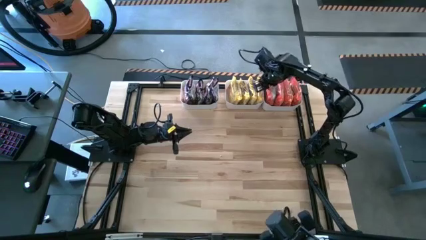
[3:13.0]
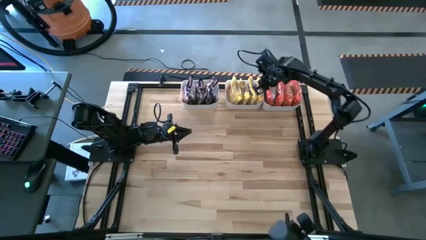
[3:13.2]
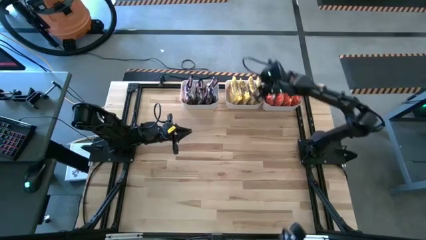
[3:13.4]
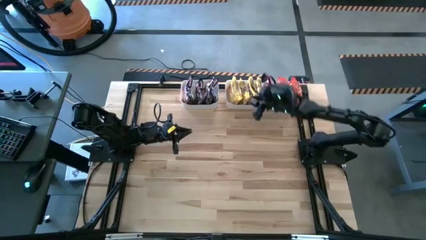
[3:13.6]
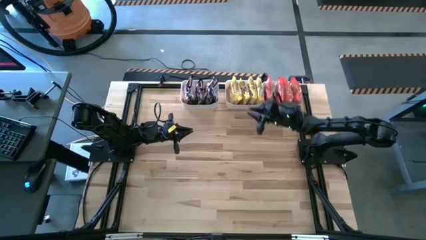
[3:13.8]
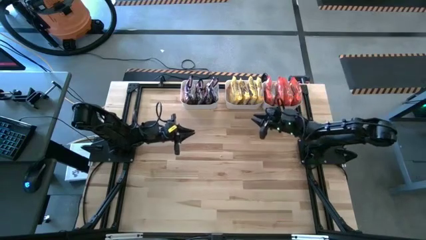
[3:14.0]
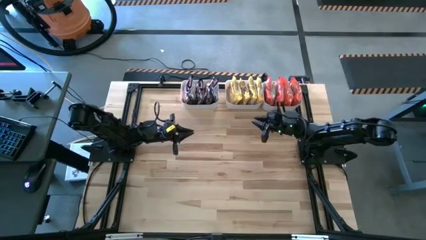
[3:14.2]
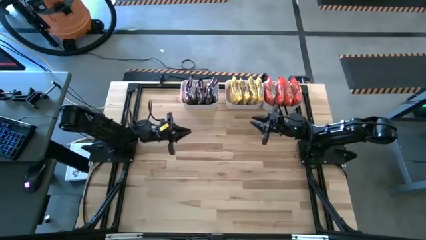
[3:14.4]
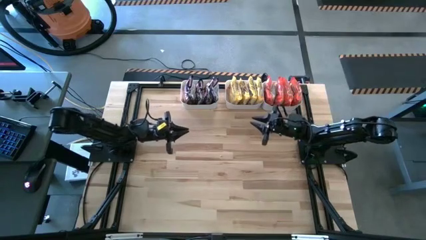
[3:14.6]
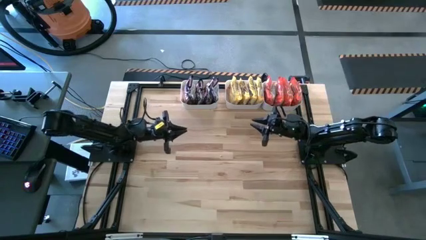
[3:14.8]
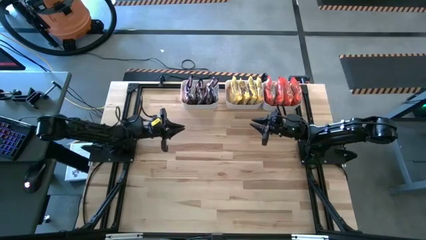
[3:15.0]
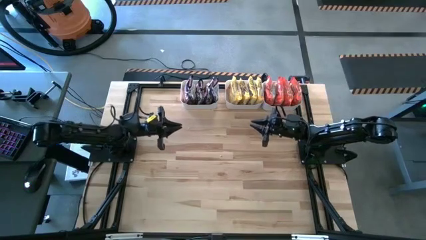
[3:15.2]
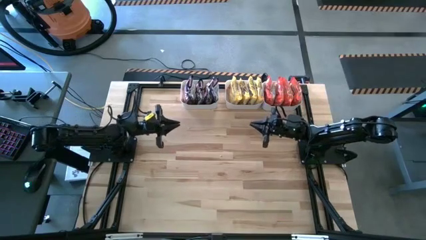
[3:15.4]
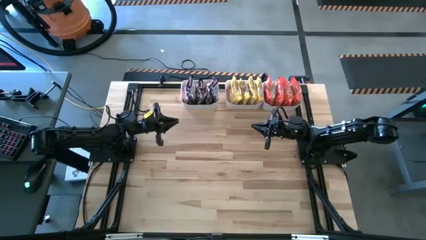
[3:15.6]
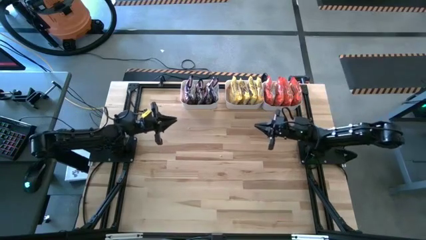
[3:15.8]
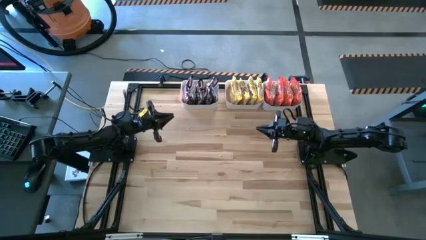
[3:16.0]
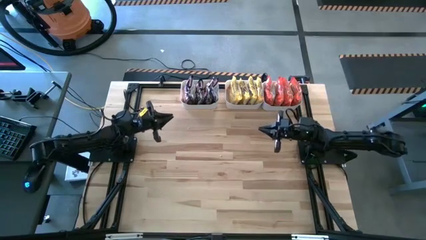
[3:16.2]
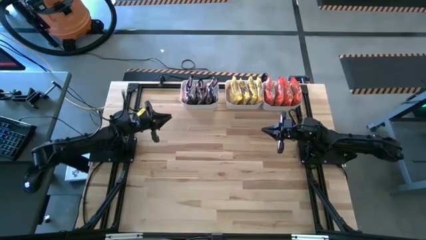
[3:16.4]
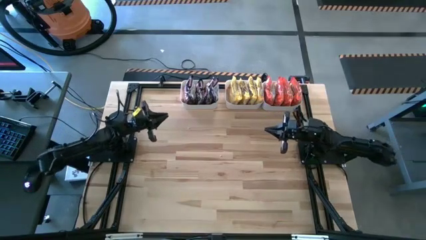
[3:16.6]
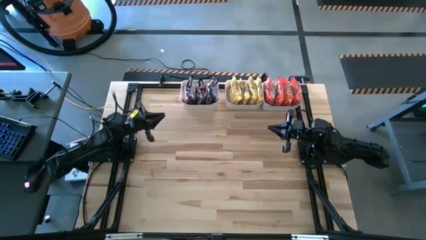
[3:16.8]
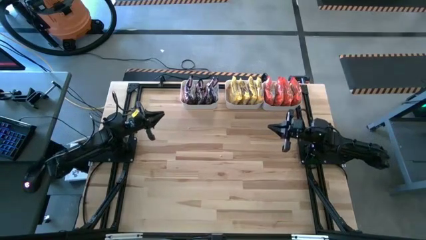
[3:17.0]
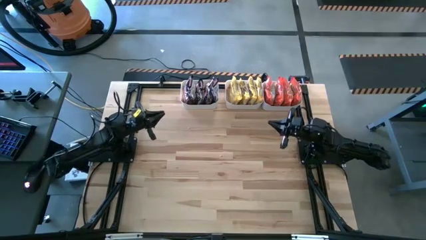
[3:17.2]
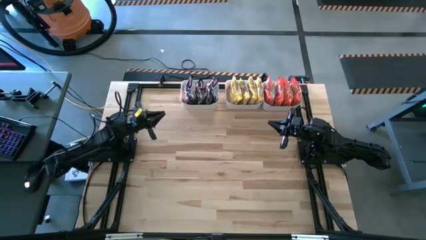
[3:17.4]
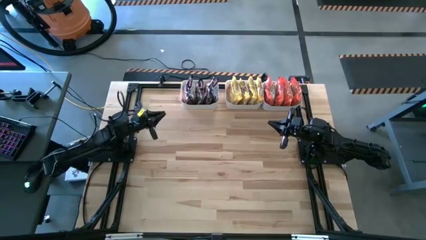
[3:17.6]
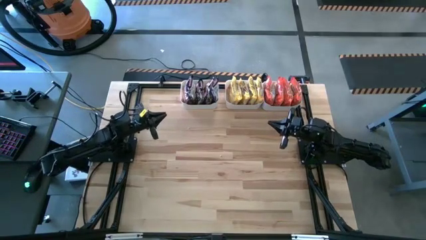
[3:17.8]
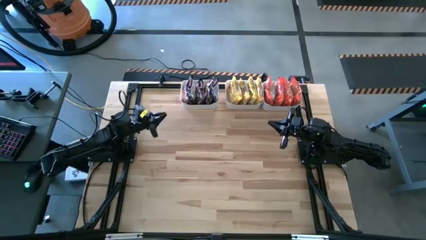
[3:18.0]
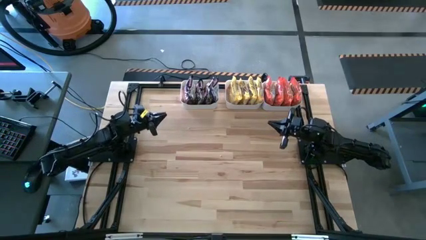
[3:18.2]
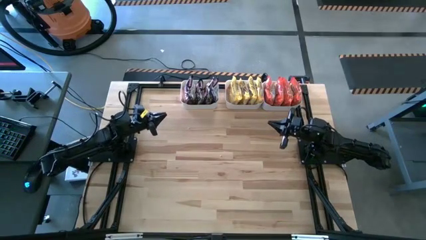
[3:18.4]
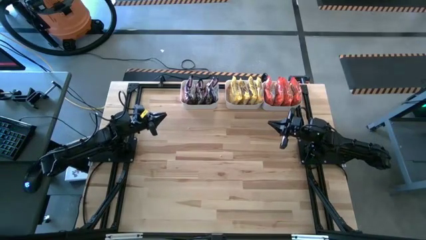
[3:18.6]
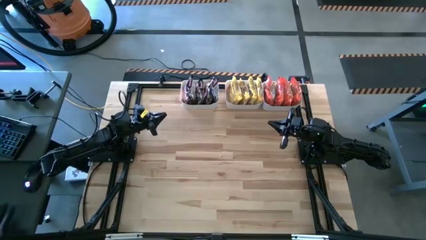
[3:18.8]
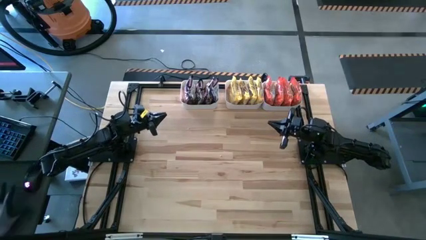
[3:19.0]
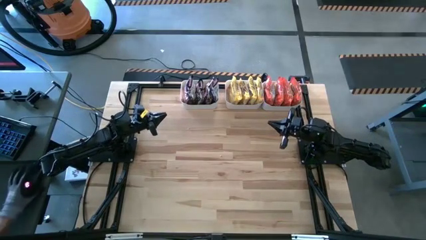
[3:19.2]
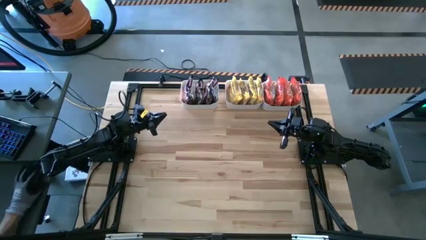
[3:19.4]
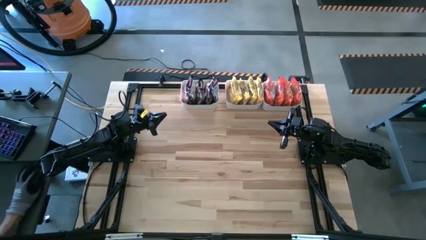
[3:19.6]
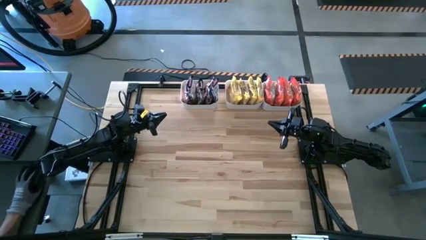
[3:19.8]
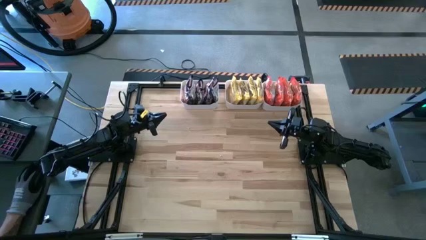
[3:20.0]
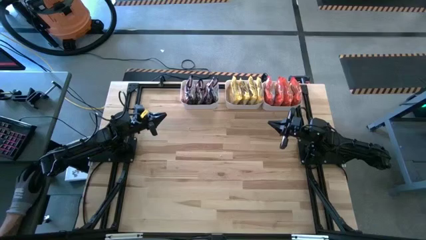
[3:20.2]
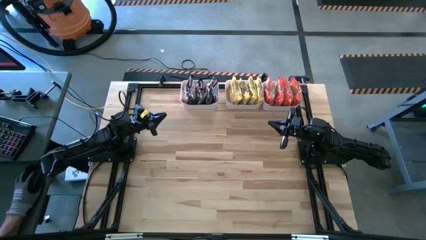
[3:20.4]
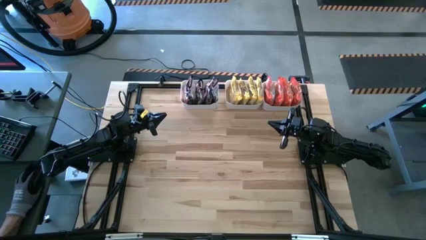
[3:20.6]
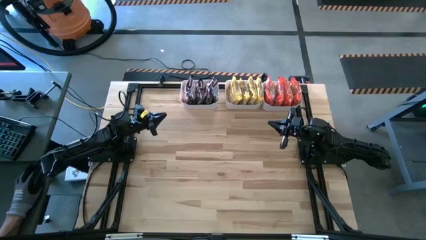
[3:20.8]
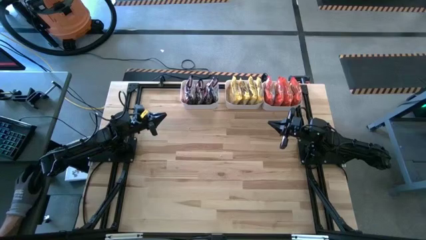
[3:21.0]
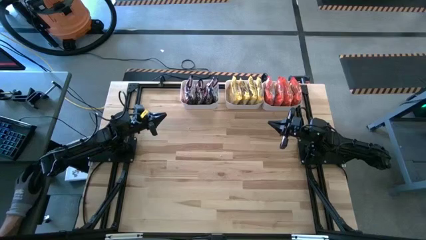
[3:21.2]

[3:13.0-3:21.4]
Task: Sort Maruchan noodles
Return to Home Position

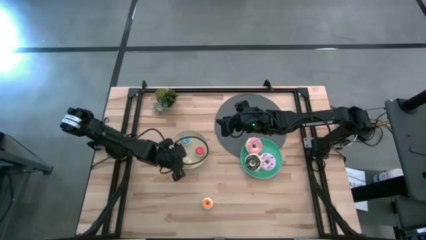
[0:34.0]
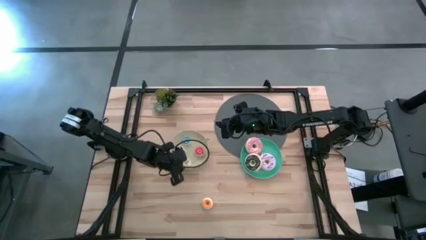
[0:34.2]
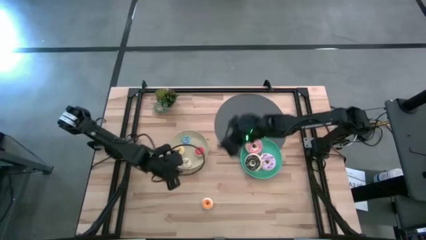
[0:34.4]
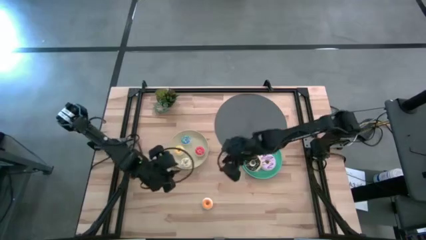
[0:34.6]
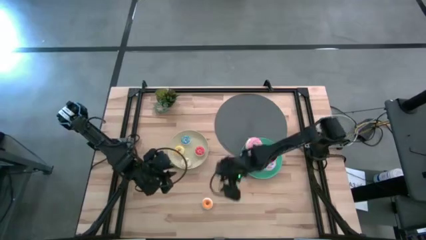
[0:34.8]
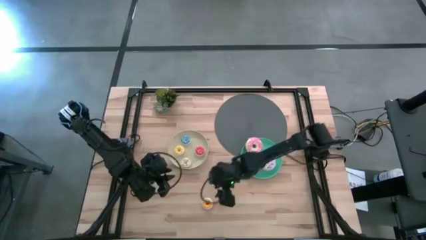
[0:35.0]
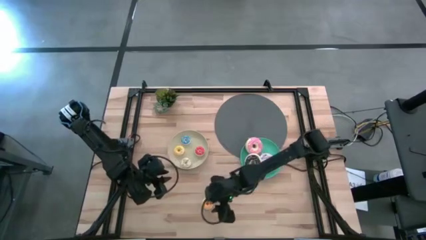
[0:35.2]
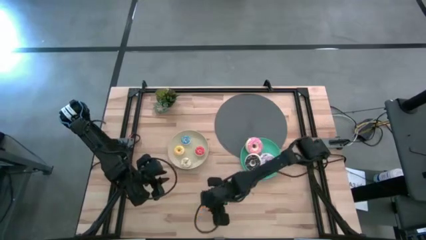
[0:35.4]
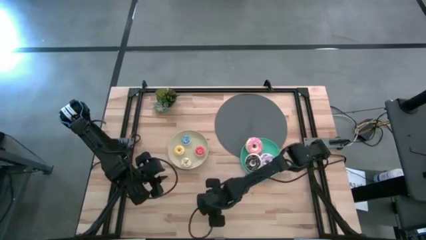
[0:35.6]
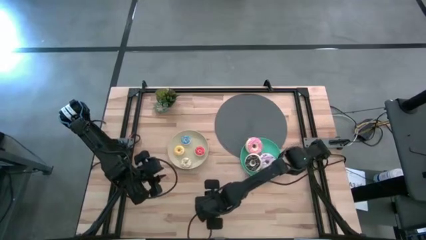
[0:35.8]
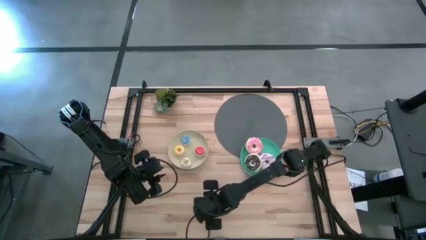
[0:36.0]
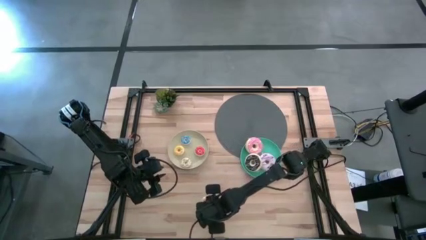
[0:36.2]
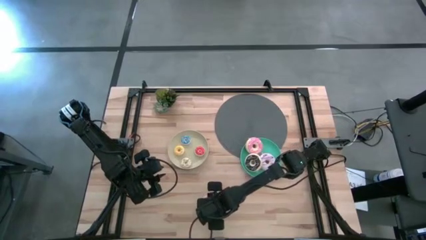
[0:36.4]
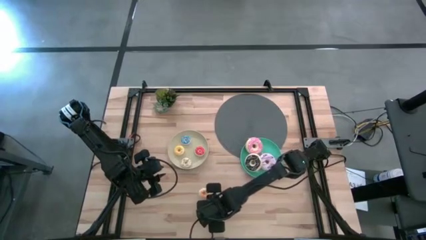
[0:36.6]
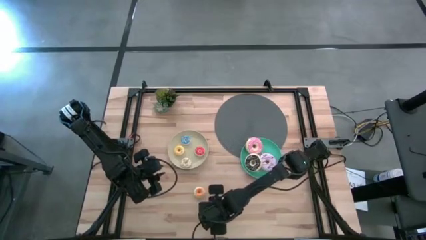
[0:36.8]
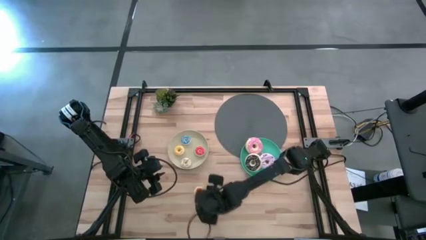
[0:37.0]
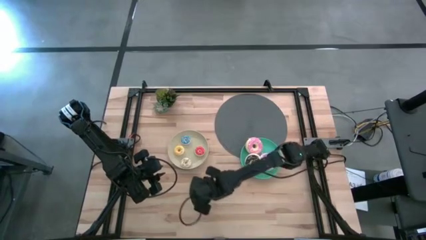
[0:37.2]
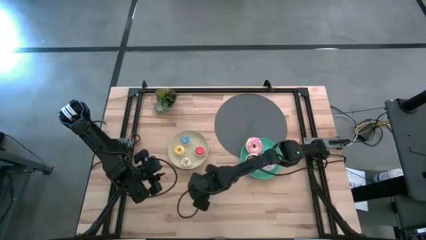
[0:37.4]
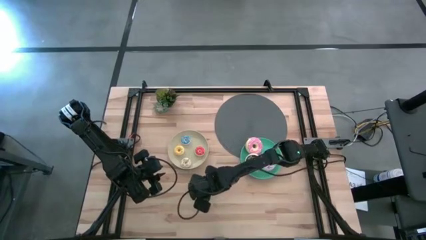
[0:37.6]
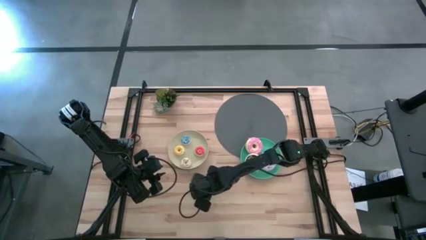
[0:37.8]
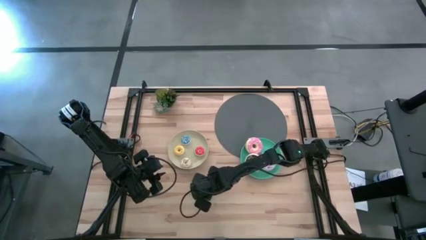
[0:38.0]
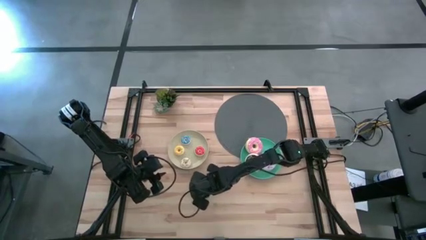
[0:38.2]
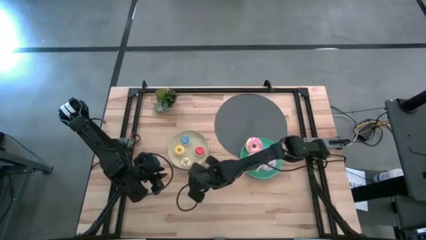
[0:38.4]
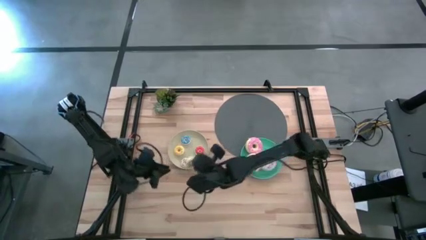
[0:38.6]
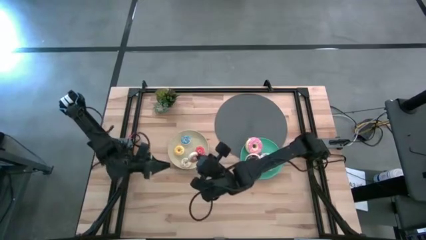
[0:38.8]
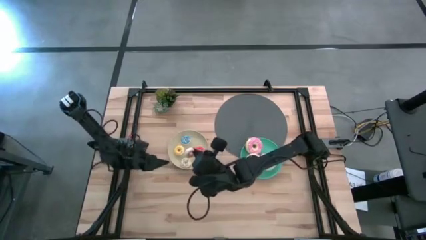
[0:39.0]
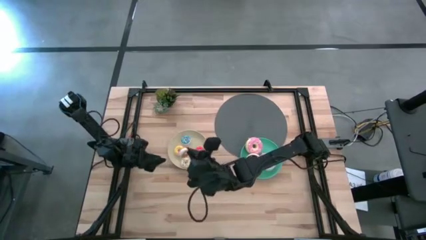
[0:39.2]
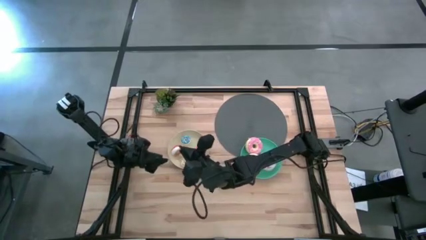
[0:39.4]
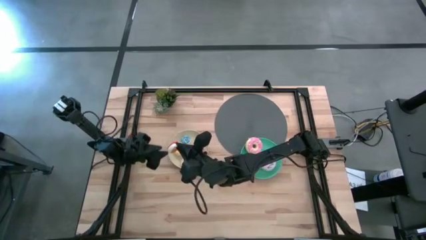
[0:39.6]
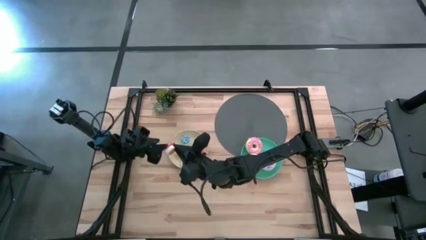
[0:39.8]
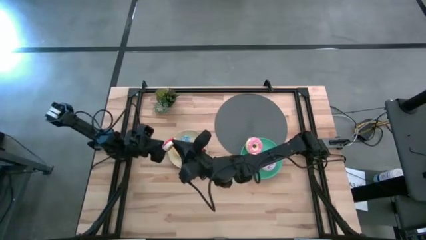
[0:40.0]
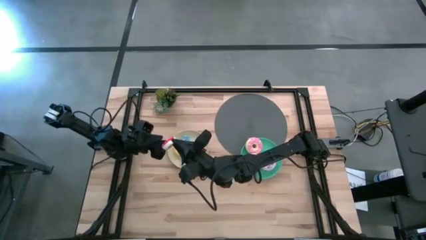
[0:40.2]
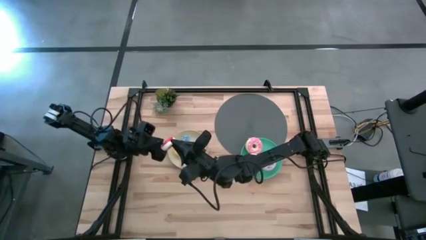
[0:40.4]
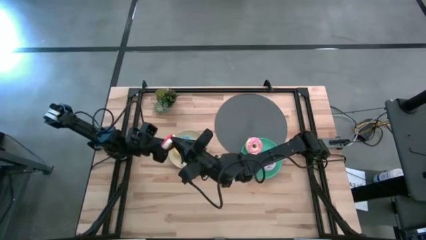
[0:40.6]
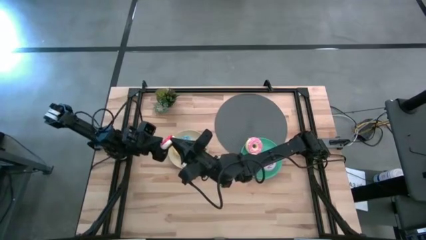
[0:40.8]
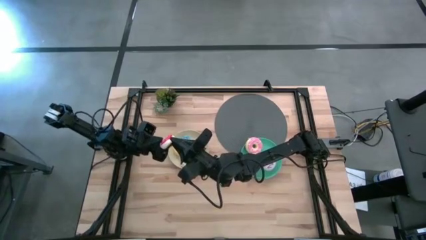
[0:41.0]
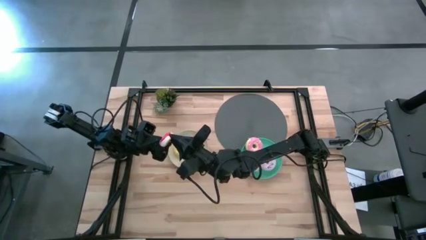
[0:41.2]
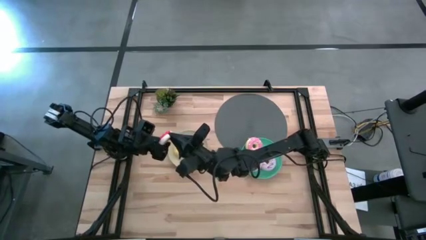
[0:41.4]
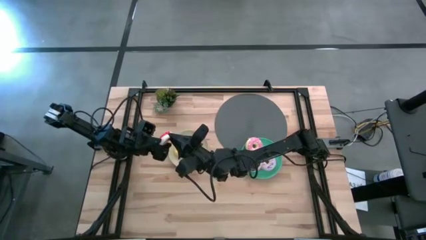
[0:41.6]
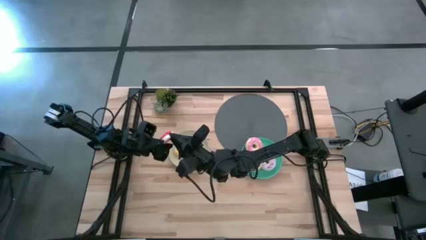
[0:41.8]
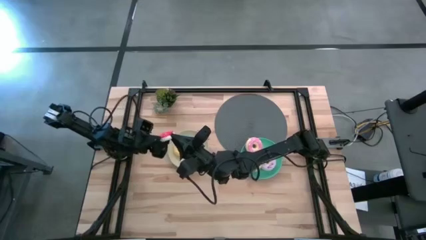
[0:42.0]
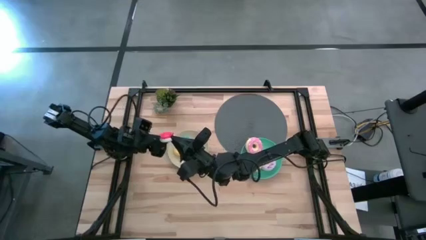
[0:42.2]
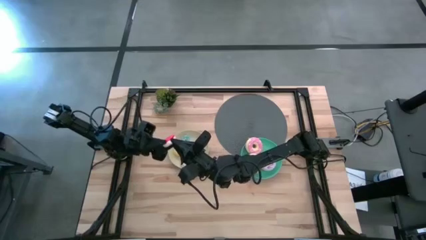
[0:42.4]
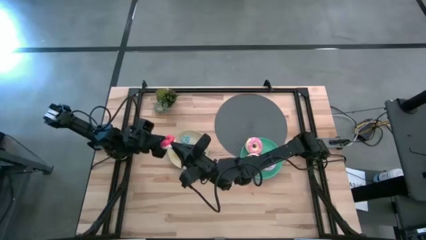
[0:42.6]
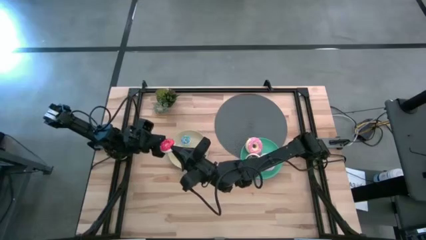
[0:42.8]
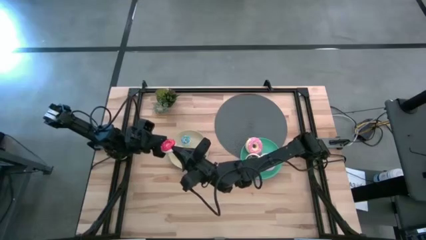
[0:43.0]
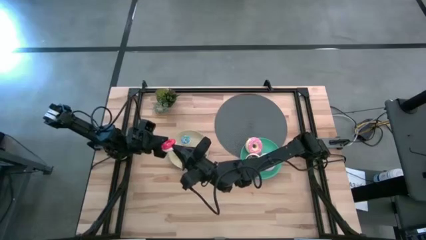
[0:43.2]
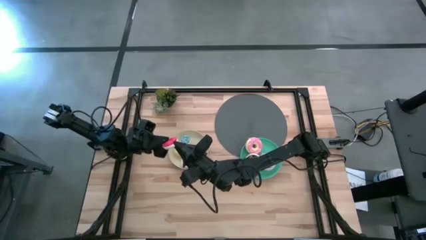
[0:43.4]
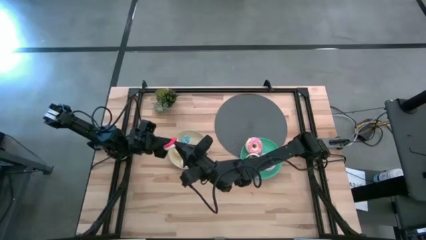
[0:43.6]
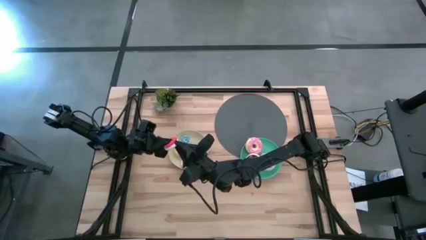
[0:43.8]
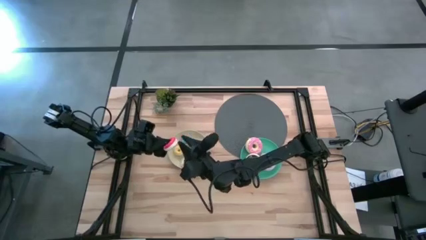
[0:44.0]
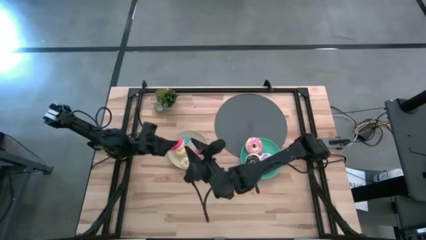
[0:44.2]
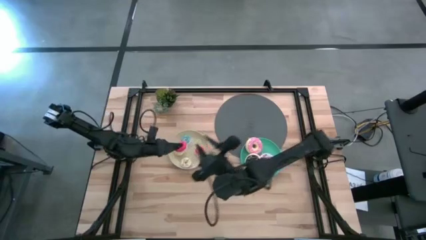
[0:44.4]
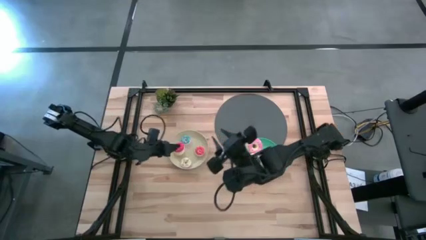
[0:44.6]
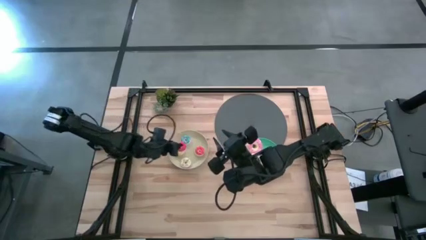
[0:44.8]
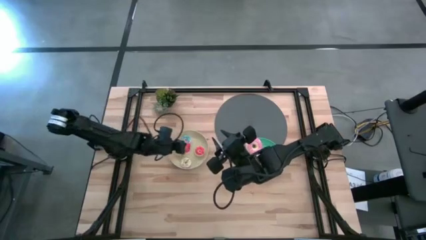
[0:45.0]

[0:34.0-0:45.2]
Task: Pick & Place donuts
Put the small red donut on the light brown plate
